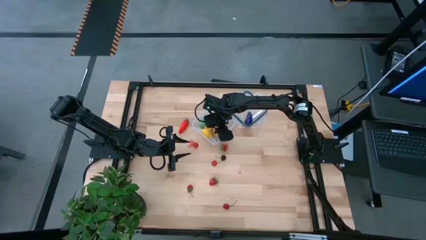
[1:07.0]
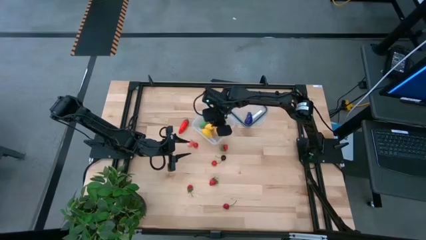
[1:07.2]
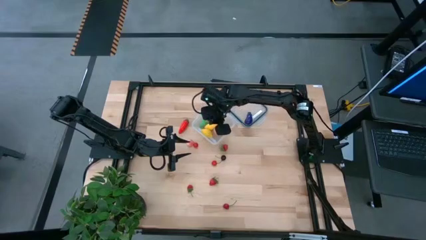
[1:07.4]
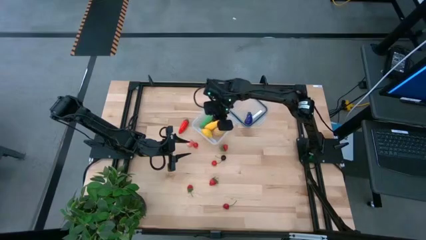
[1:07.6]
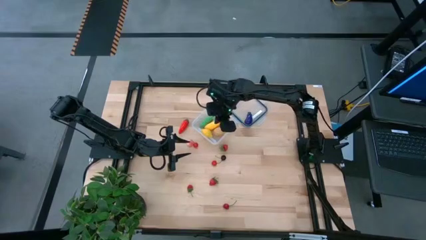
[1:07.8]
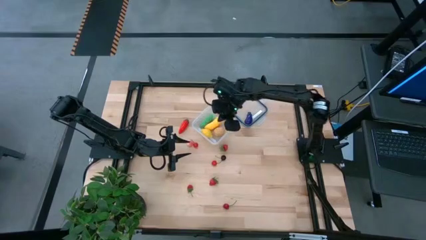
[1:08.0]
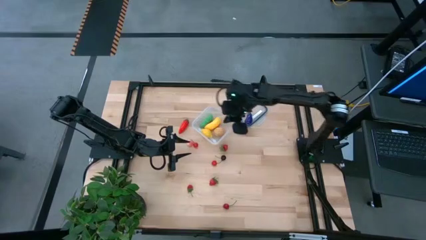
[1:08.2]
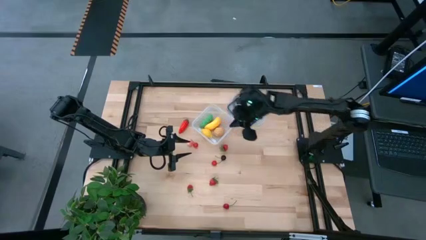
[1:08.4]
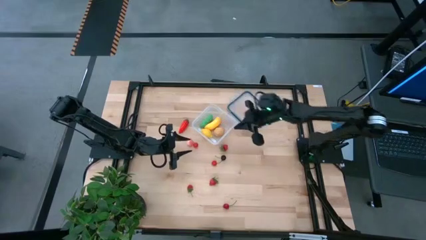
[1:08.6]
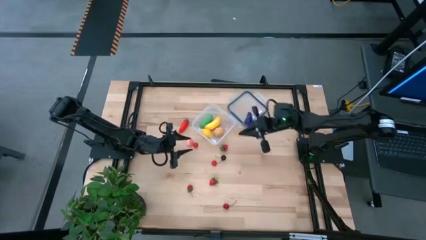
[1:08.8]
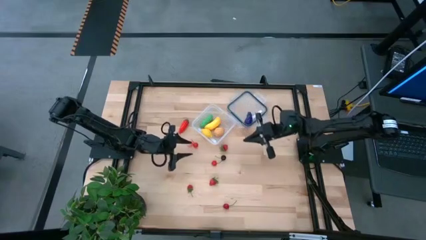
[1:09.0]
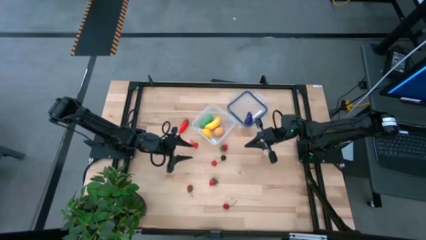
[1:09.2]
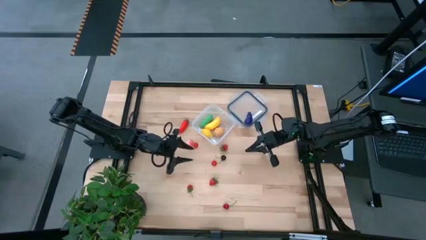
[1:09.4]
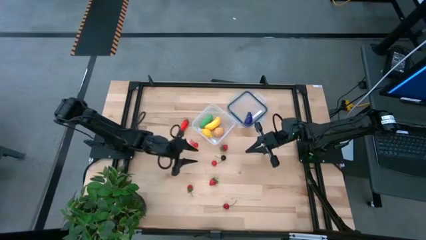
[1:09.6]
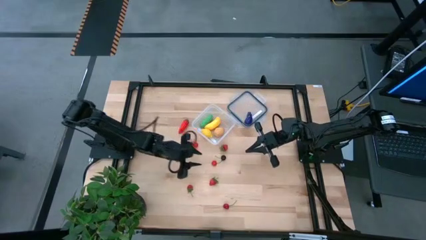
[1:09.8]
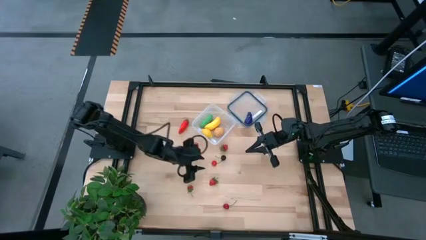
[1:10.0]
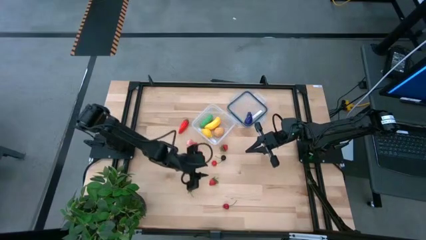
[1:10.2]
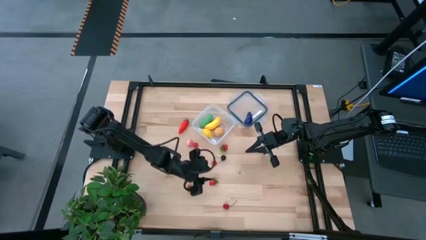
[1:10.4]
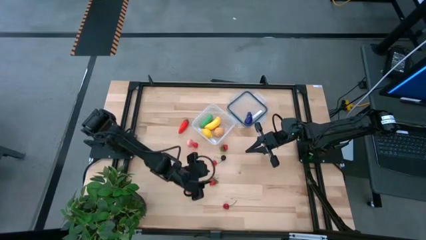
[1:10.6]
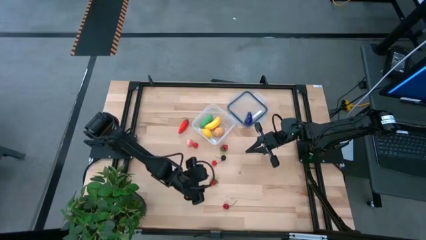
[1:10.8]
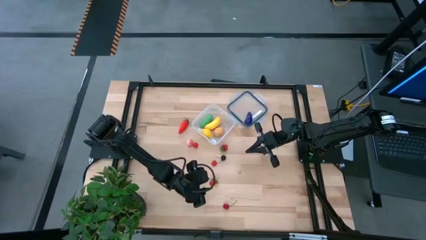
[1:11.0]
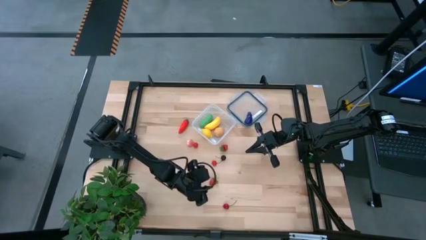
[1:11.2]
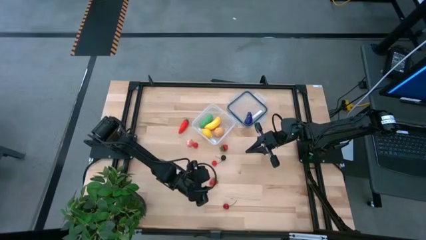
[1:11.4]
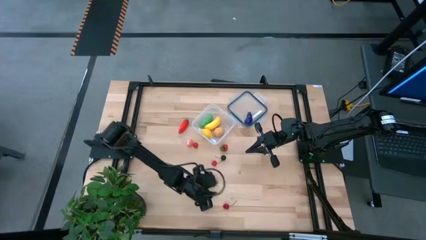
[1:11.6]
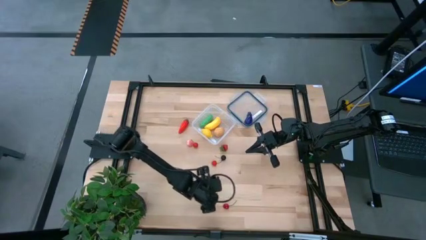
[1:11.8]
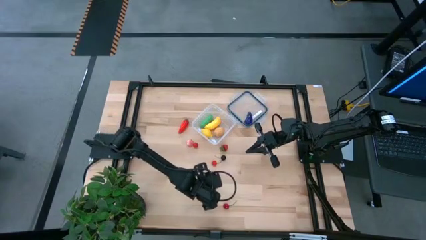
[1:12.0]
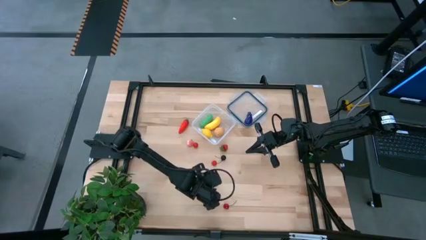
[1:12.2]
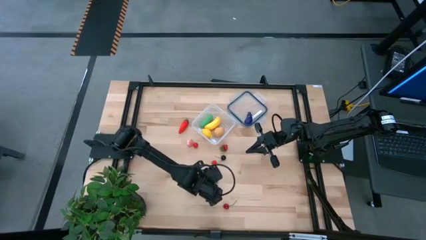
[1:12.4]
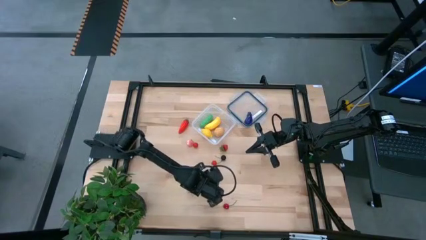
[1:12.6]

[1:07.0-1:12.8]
Task: Pick and placing Produce into tupperware
Put the middle red strawberry into the transparent container

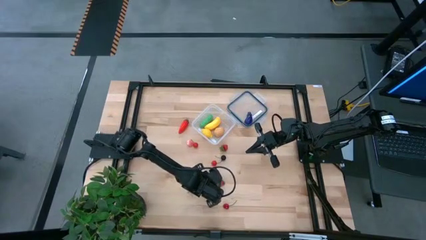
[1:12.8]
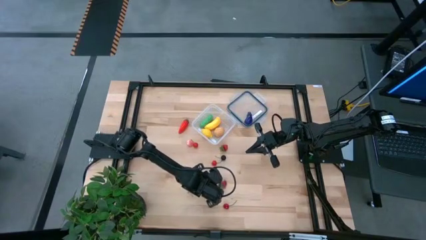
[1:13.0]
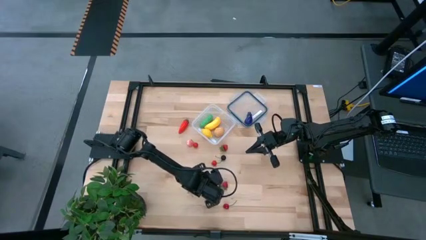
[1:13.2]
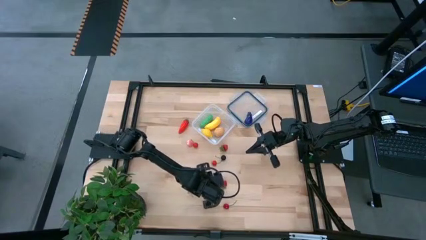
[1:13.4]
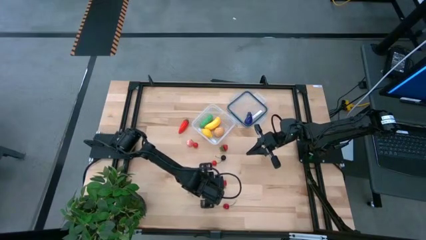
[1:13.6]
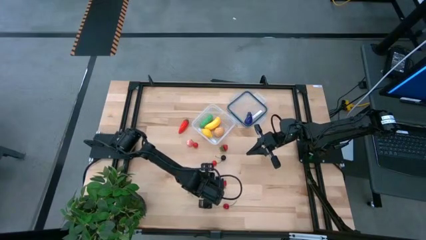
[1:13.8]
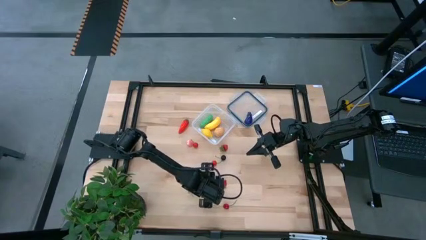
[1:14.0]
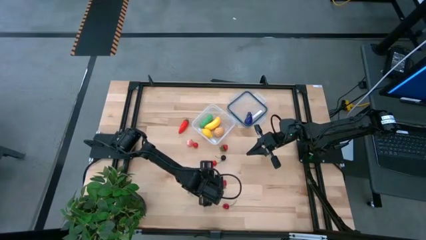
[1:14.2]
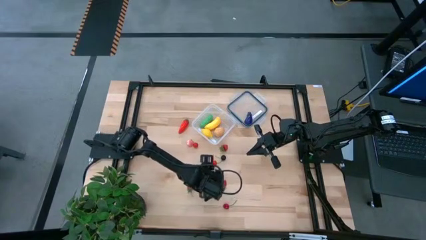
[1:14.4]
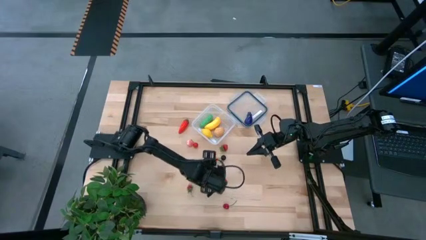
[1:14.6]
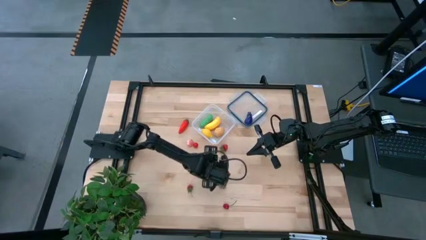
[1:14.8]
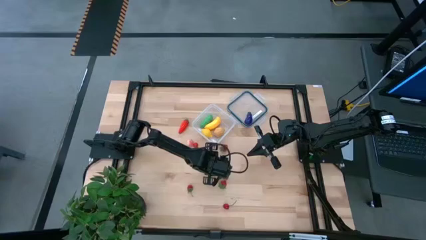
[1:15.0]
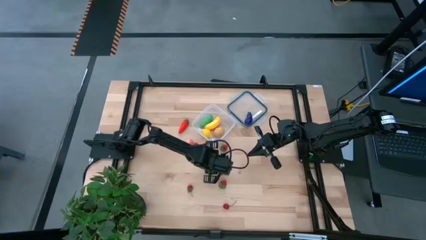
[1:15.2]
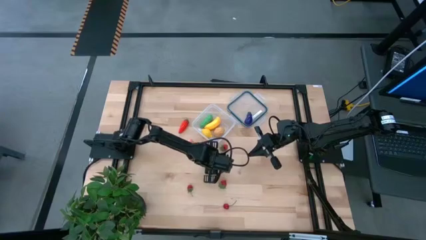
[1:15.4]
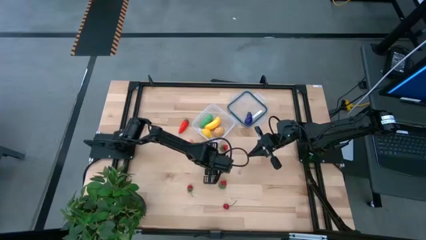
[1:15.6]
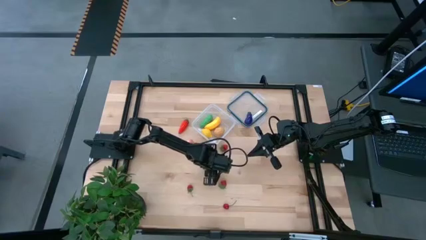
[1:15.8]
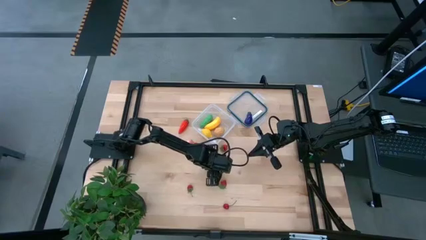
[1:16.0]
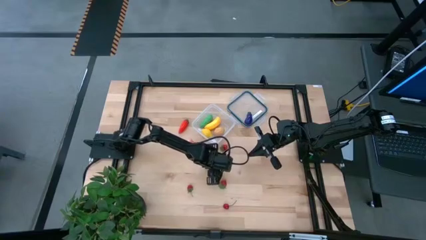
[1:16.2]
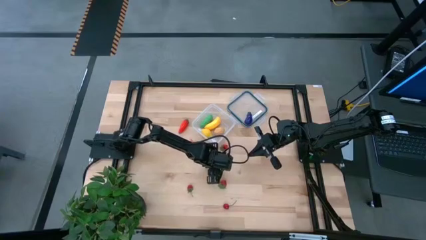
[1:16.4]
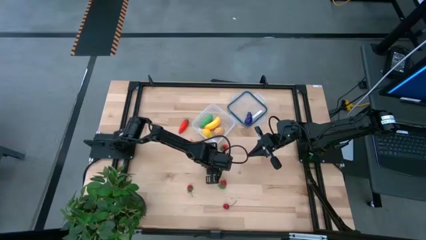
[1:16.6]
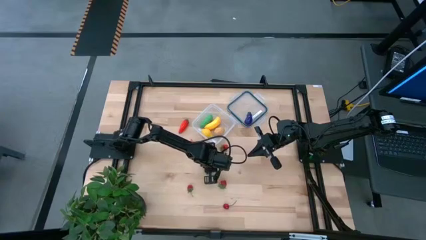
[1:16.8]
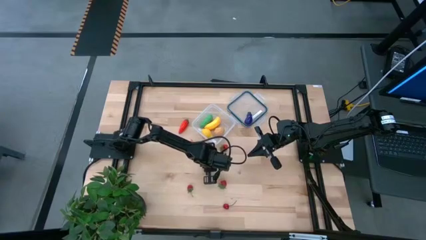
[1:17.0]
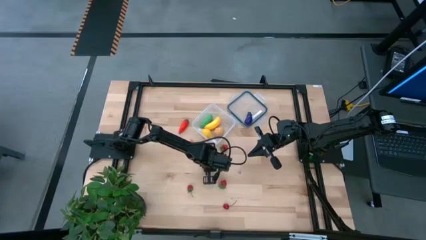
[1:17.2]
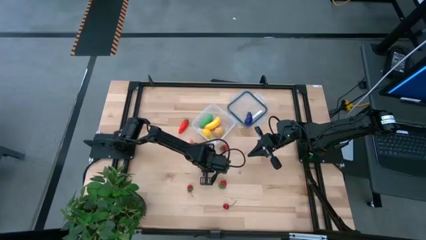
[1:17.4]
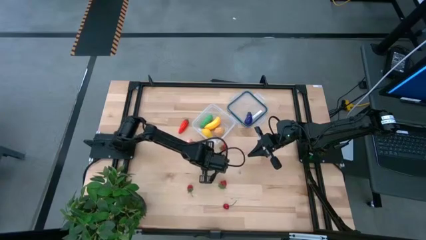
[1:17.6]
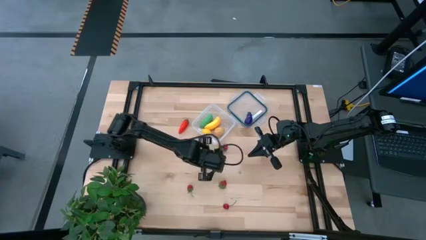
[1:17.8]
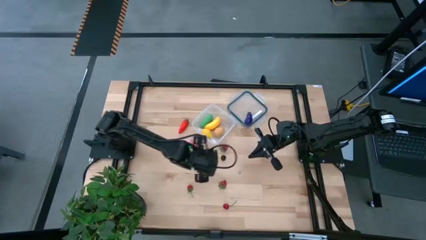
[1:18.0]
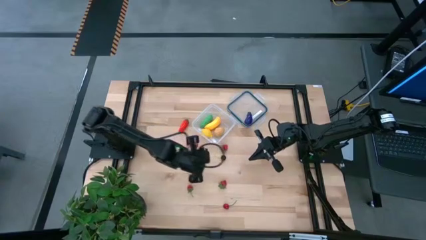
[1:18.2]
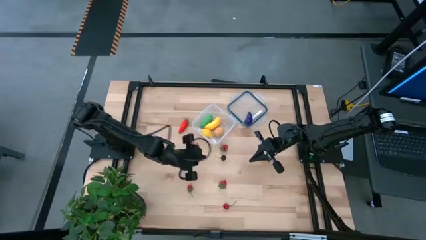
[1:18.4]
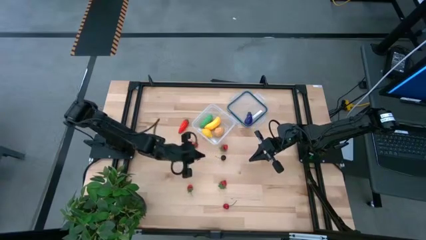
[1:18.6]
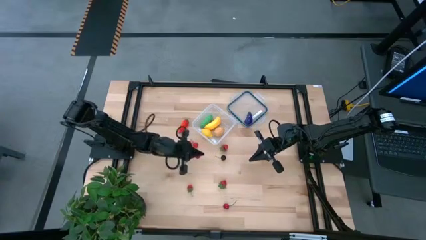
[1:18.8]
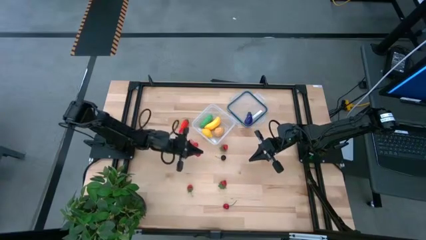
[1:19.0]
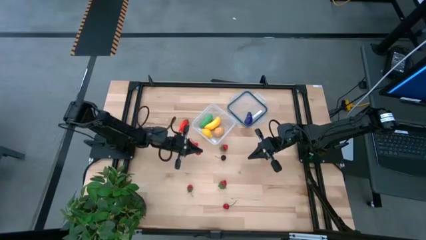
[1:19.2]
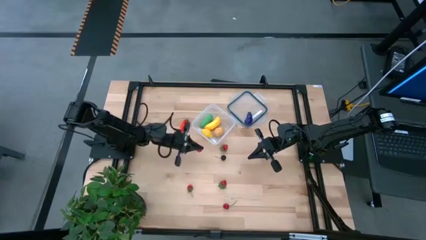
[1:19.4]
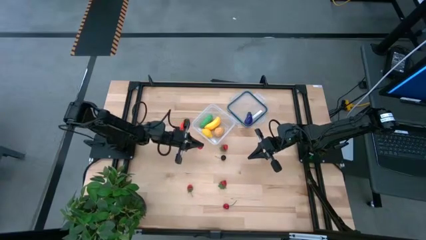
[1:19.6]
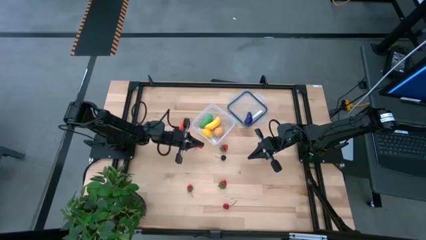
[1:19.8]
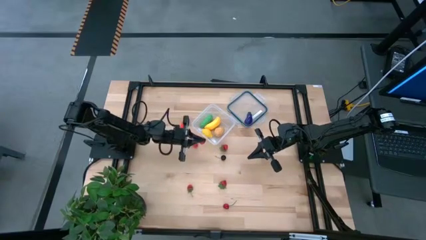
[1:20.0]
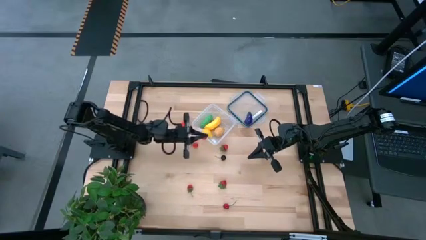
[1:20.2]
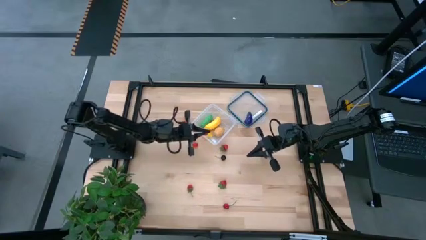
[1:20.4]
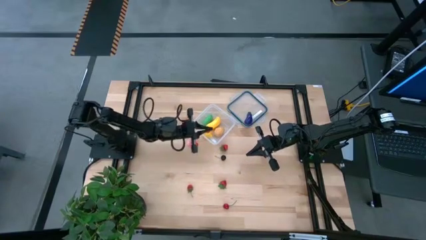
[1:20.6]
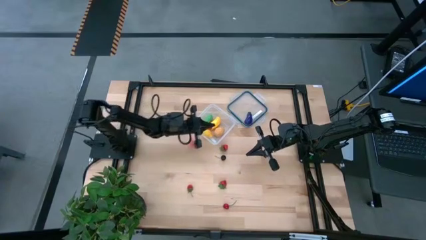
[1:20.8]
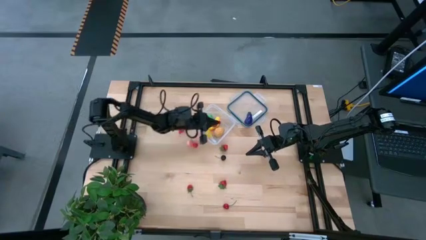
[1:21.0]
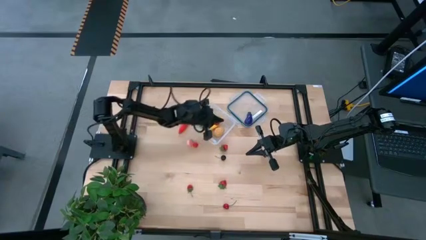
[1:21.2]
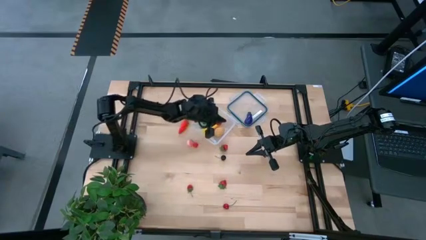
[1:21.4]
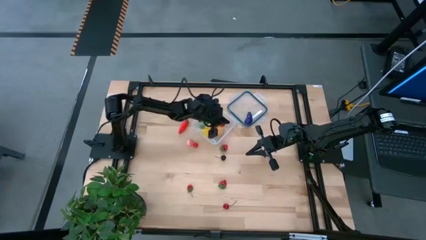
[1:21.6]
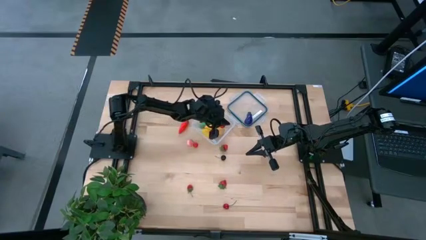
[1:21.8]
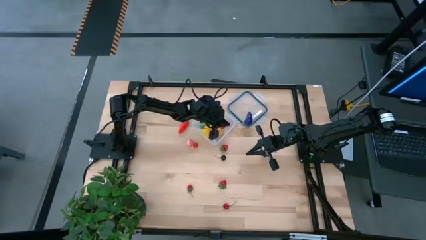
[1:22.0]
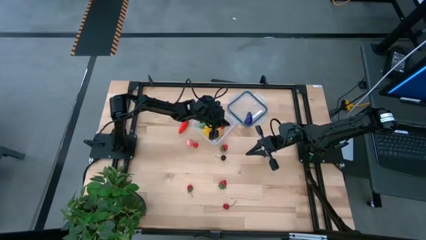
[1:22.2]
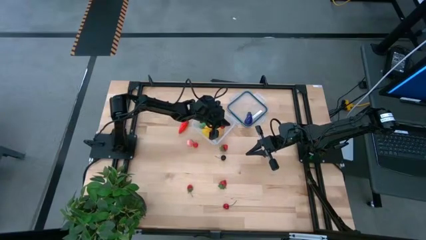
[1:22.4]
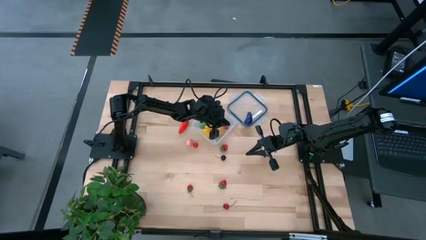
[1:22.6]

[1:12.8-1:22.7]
Put the middle red cherry into the transparent container

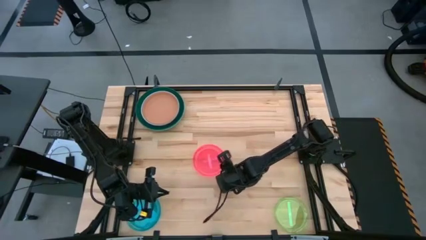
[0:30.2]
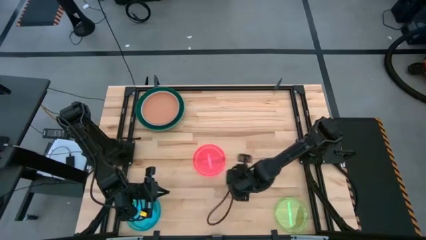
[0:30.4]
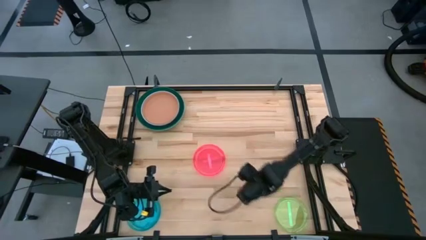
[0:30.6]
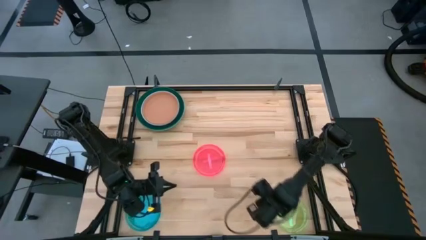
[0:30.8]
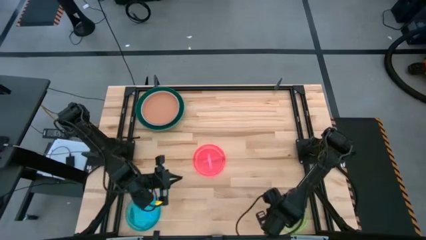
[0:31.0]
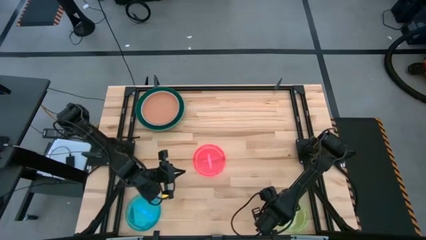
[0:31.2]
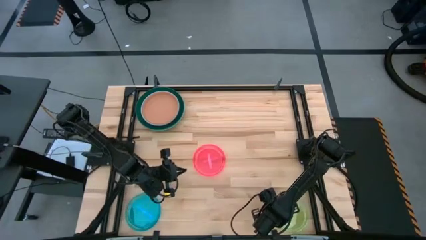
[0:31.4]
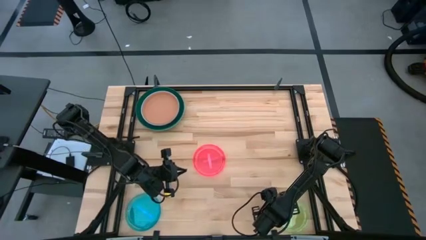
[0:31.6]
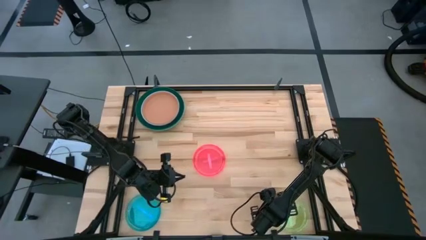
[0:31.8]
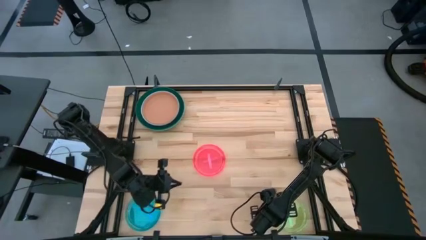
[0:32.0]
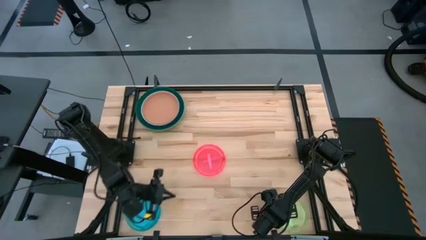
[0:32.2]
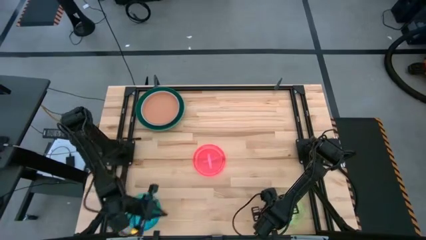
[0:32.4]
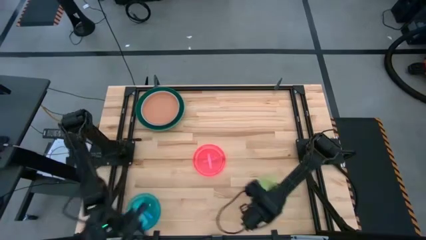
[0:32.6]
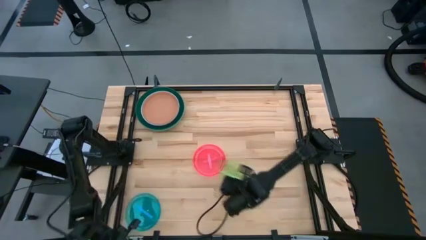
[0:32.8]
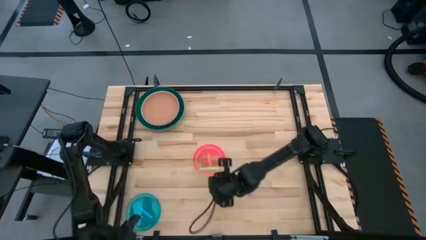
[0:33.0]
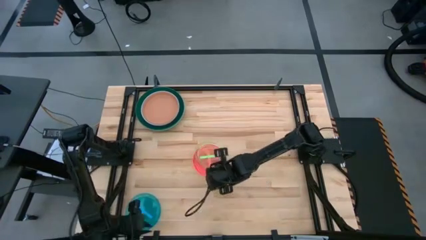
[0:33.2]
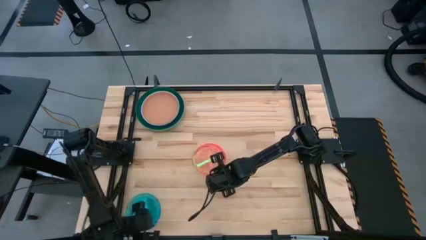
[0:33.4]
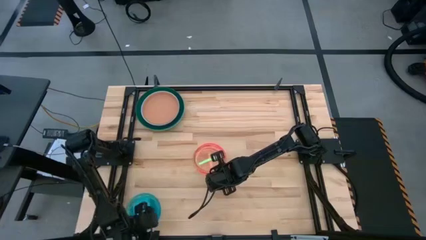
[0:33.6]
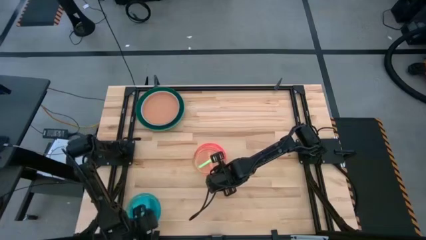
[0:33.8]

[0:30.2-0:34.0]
Task: Stack plastic plates
Stack the light green plate on top of the pink plate
